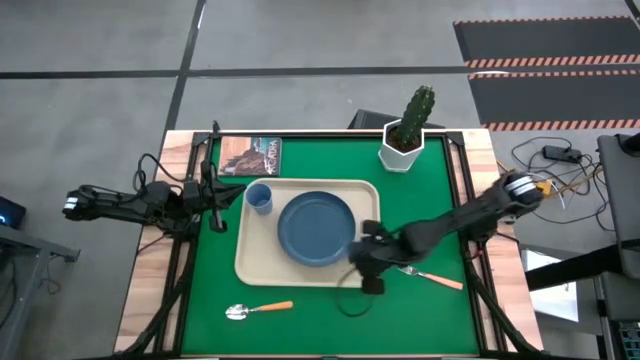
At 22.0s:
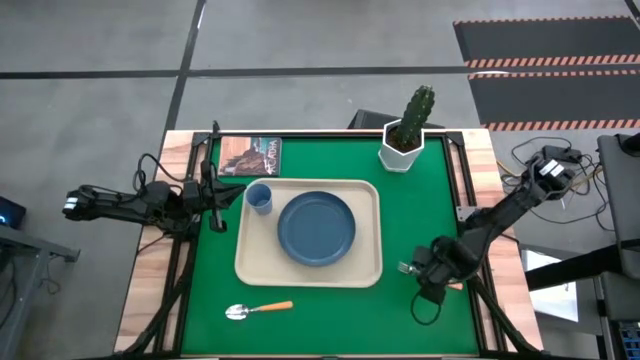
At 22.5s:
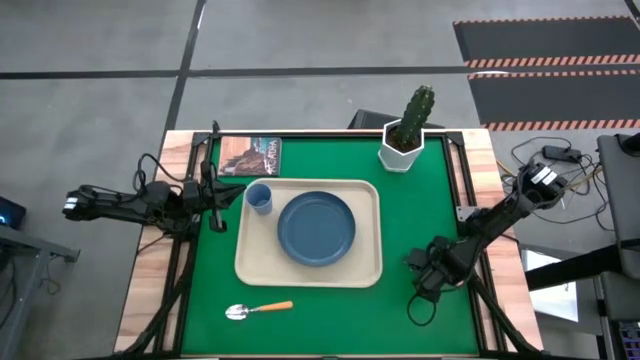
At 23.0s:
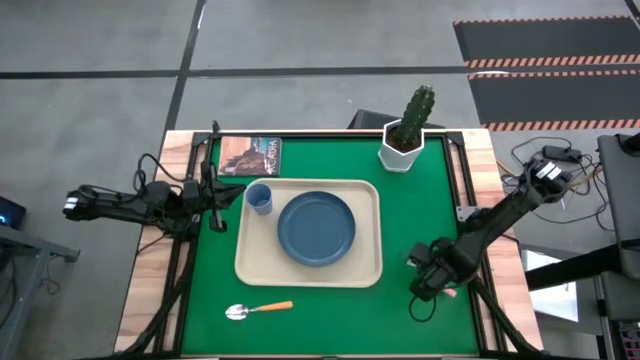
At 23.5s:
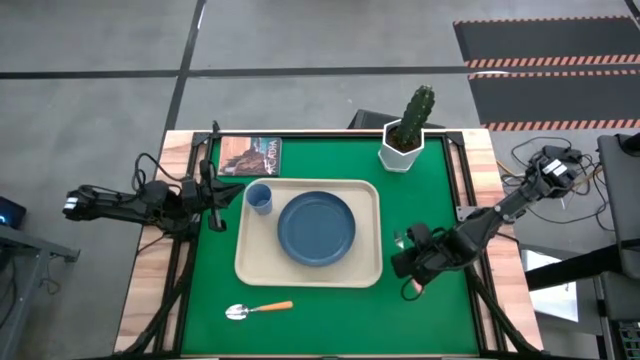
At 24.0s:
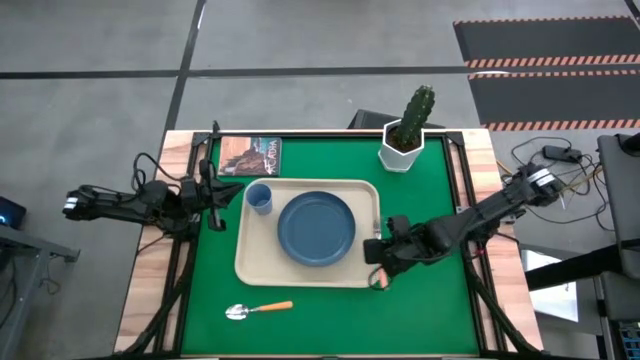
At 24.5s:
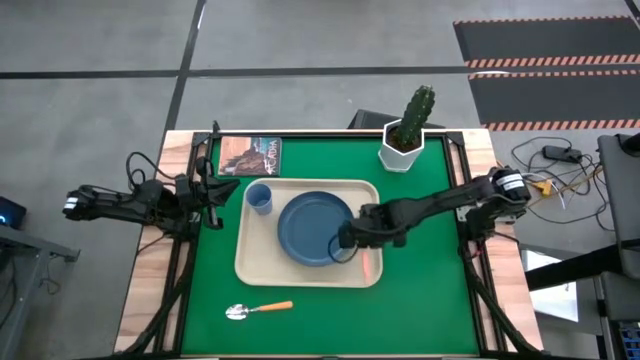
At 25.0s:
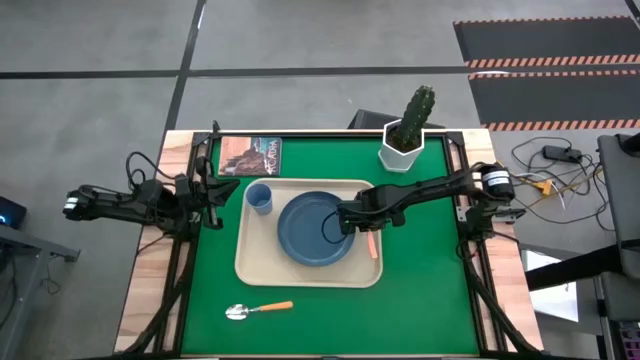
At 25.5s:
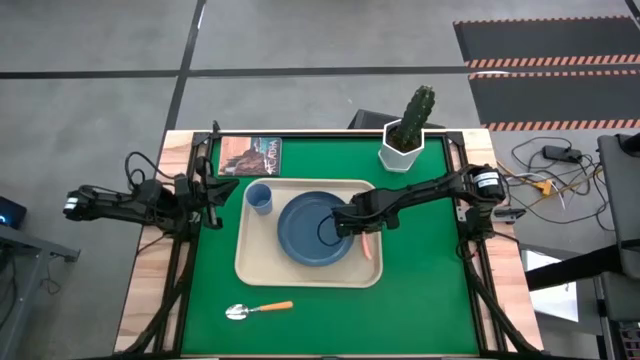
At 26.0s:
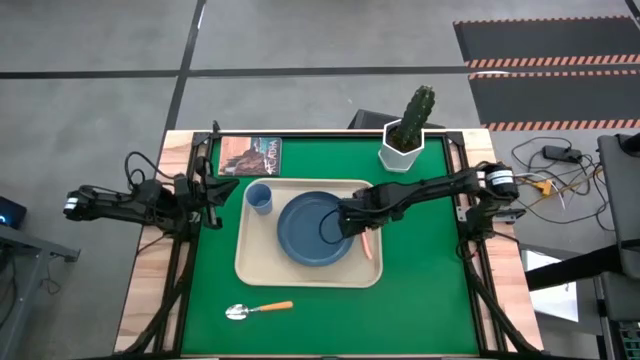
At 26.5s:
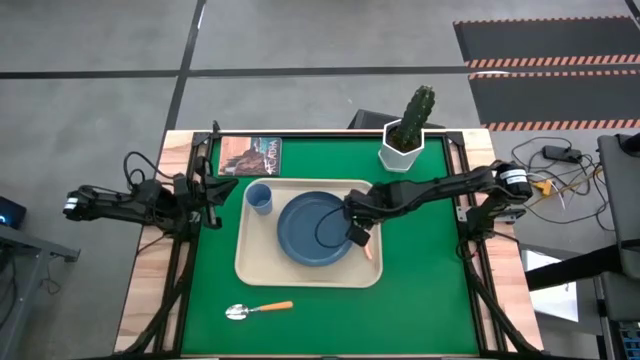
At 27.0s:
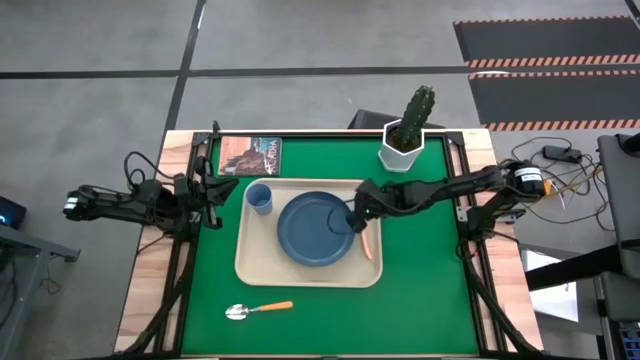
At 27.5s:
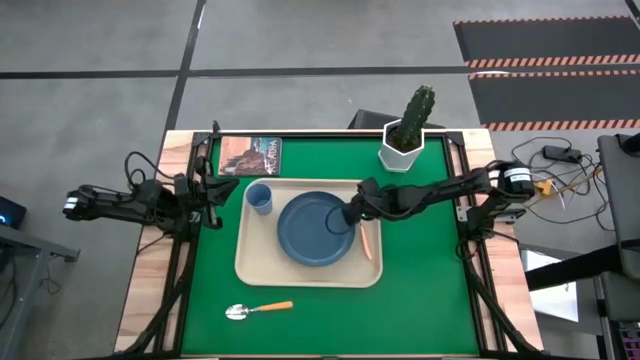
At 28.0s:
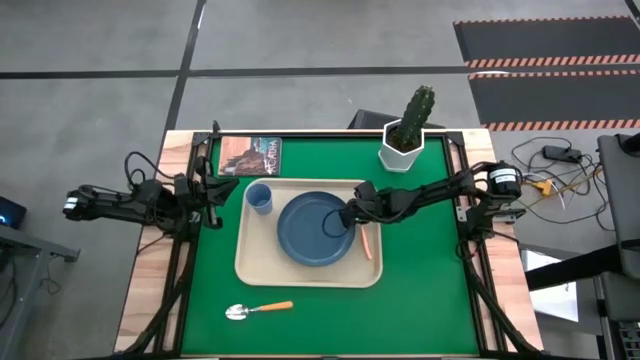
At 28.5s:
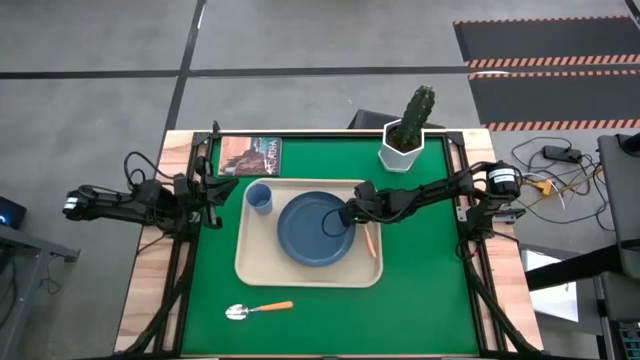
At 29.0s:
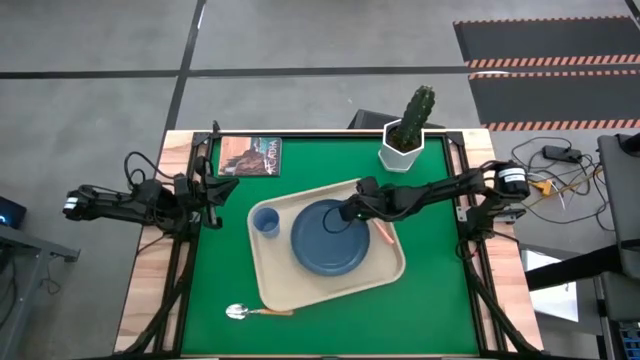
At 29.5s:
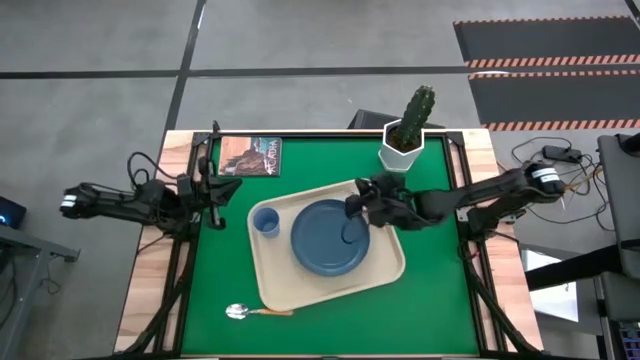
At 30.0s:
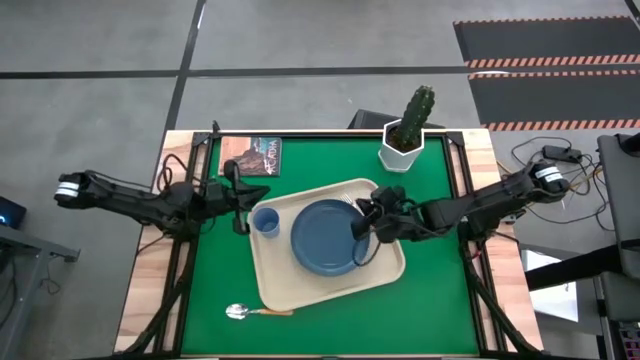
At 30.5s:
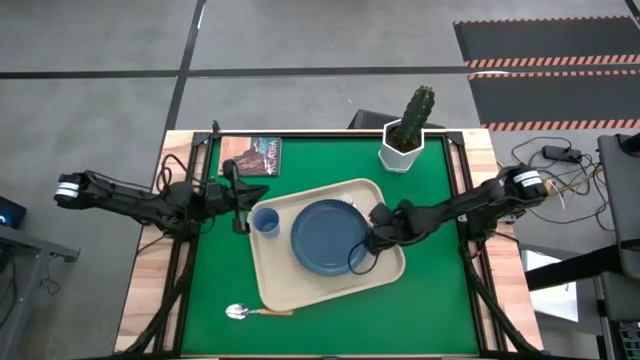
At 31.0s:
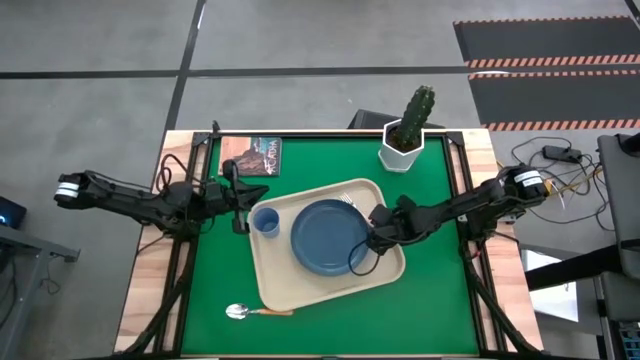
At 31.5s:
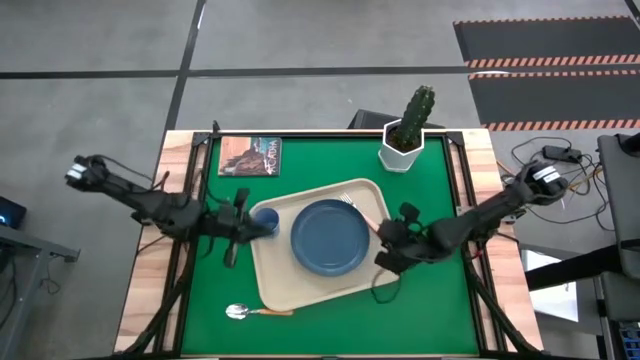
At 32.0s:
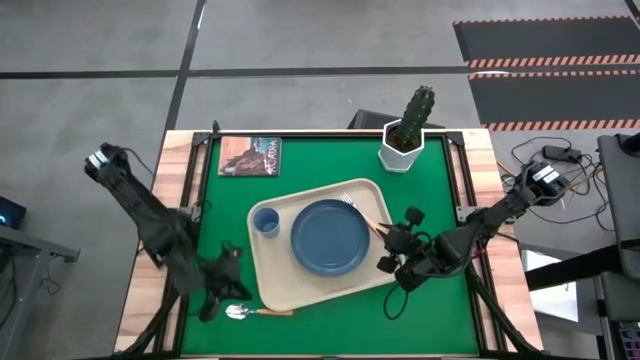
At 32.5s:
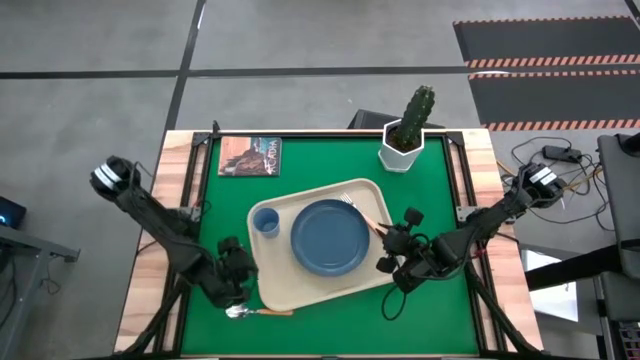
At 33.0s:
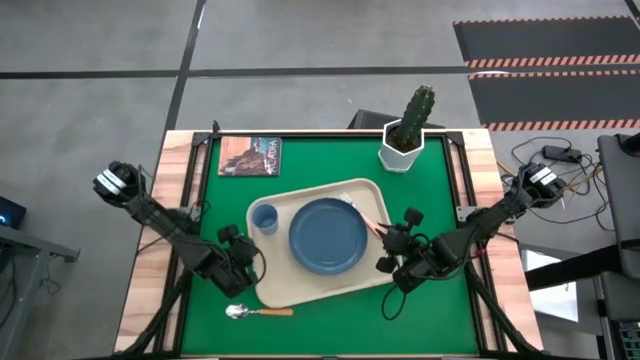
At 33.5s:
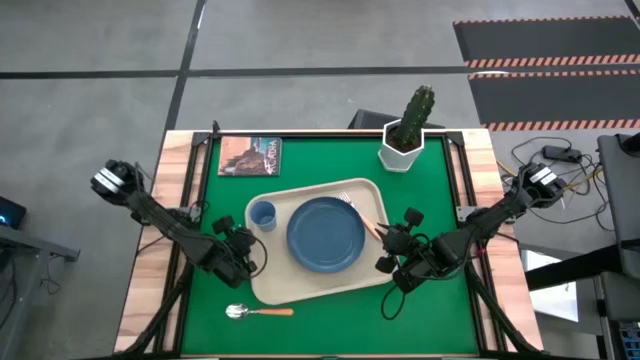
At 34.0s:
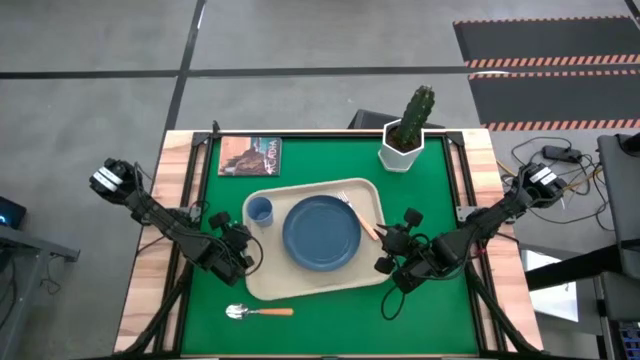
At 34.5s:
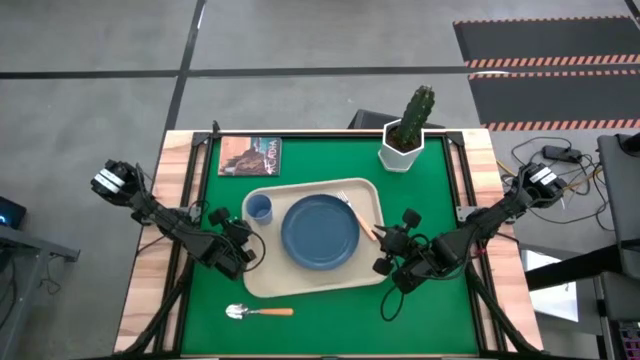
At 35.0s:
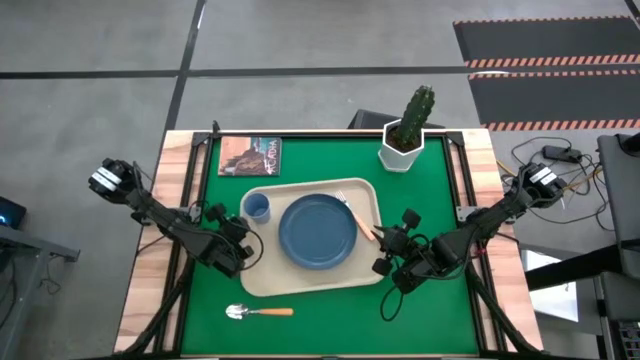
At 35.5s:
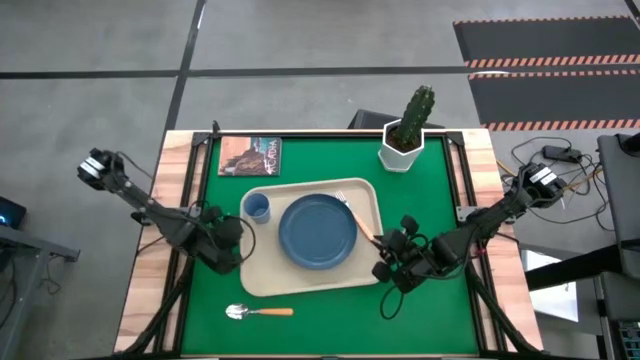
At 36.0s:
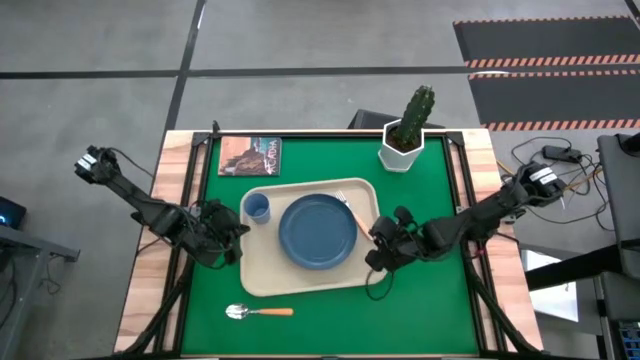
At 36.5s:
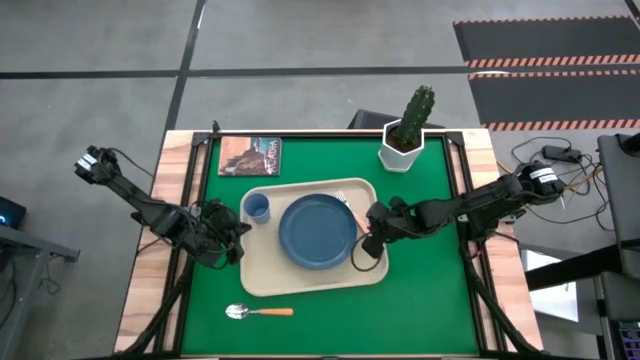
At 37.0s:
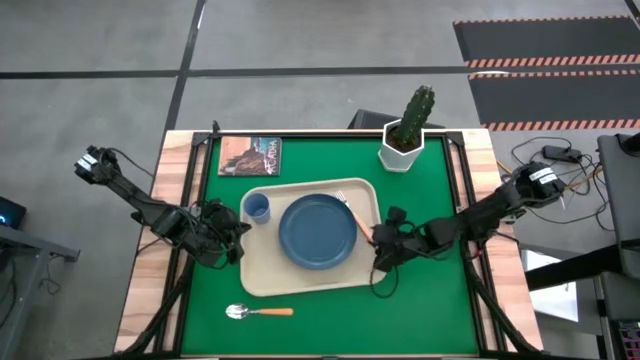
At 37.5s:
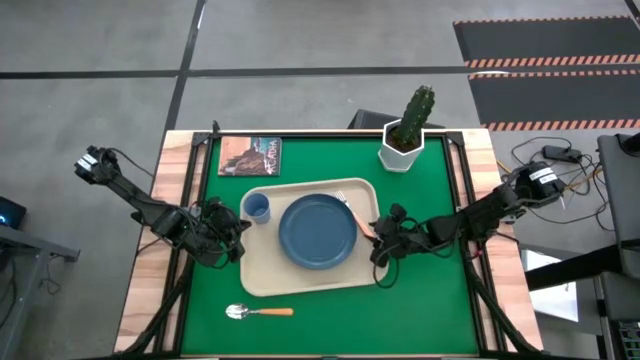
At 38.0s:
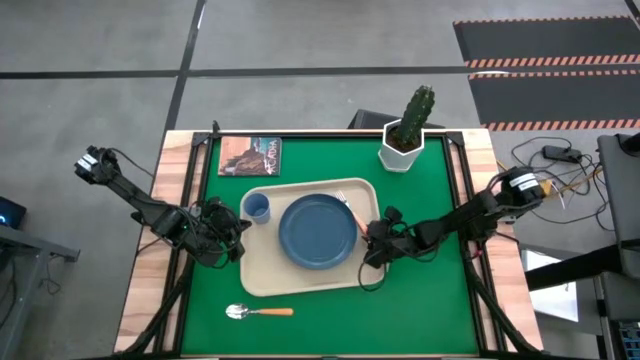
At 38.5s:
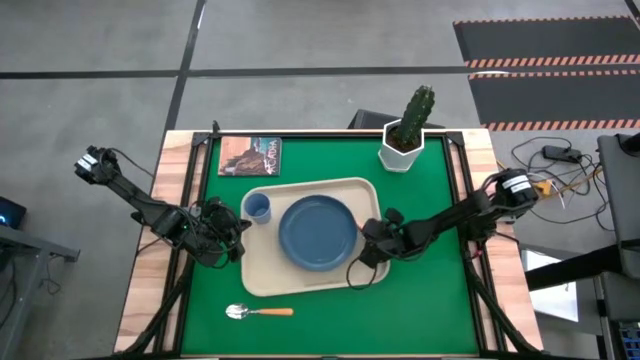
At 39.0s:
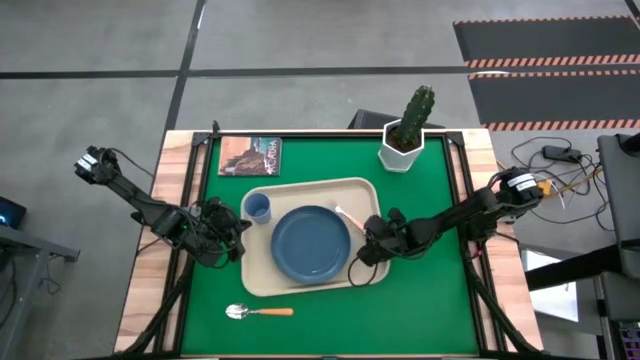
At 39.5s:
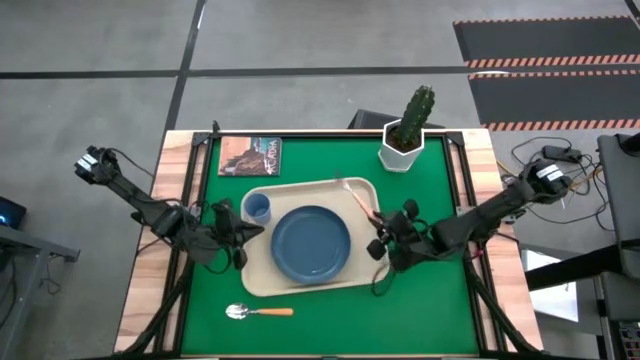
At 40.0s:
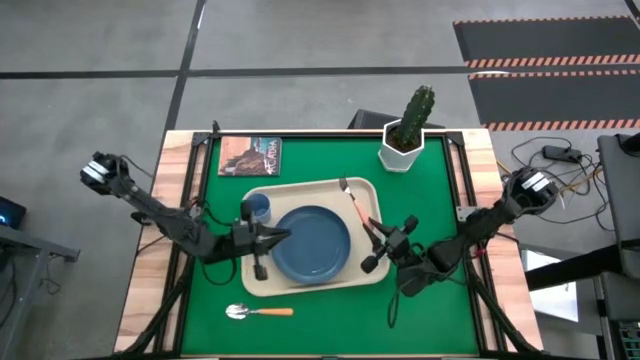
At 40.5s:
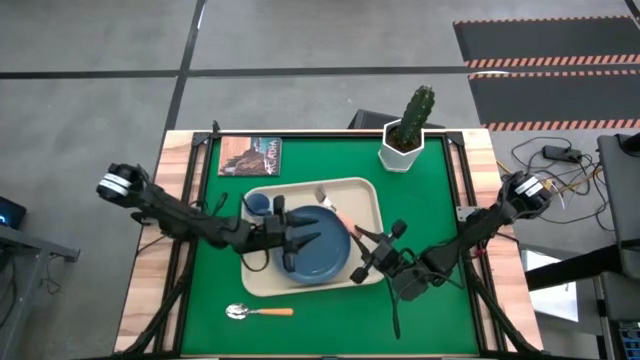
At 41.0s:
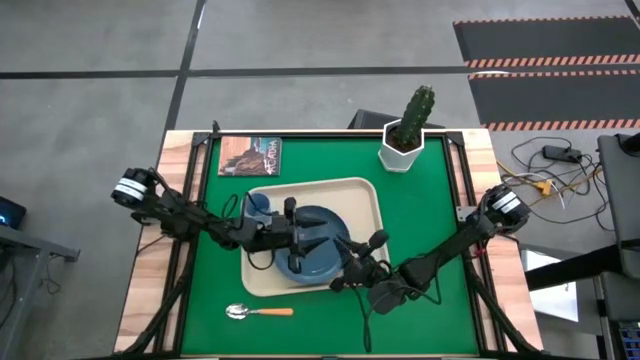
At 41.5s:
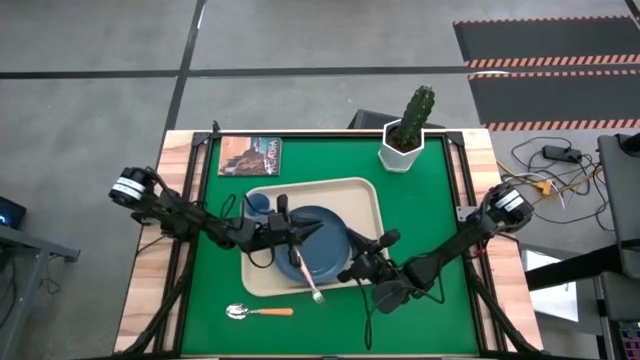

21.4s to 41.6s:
Task: Pick and place plate/cup/fork/spoon on tray
Put the orange fork on the white serving tray on the left of the blue plate
